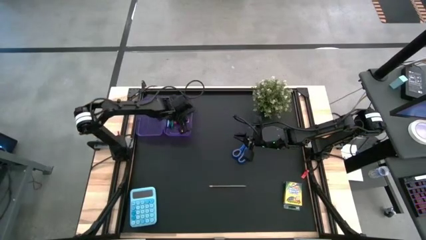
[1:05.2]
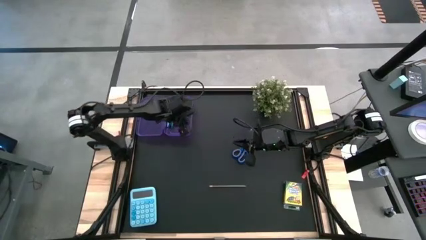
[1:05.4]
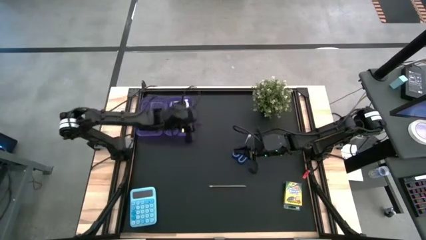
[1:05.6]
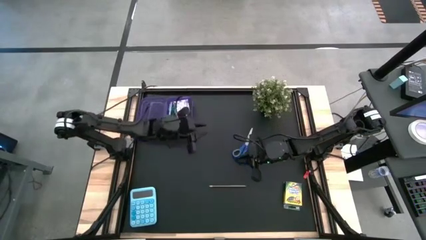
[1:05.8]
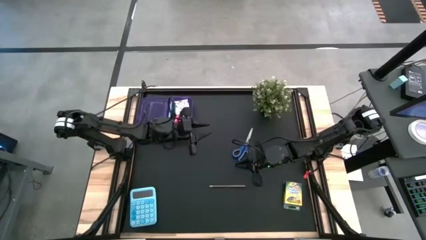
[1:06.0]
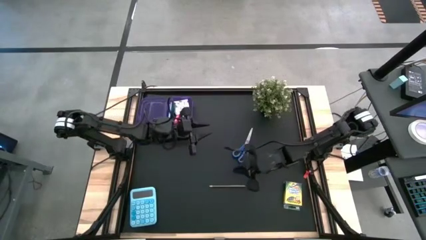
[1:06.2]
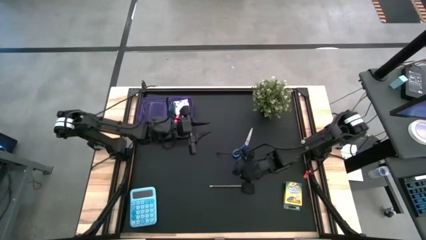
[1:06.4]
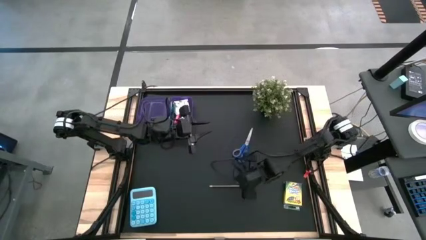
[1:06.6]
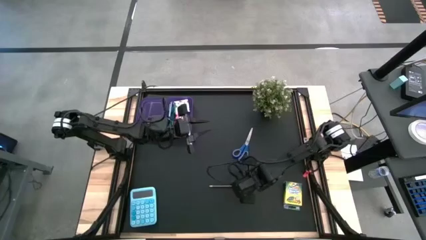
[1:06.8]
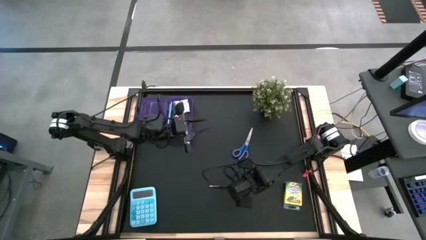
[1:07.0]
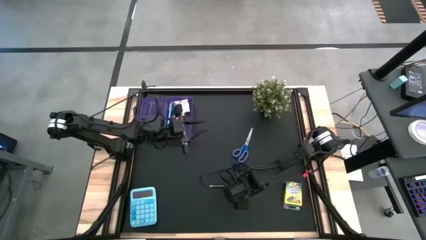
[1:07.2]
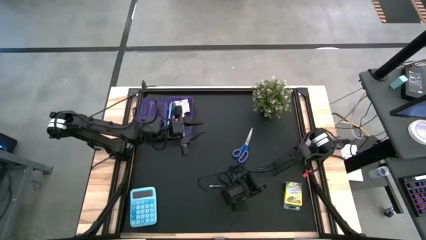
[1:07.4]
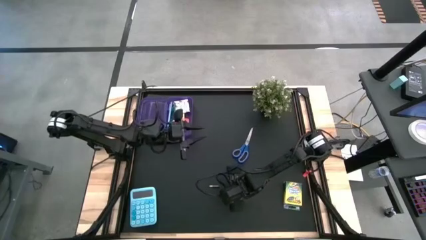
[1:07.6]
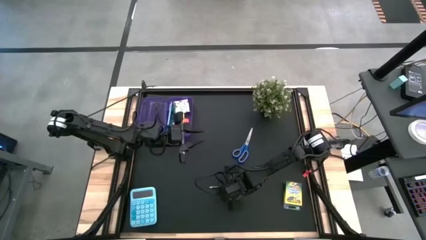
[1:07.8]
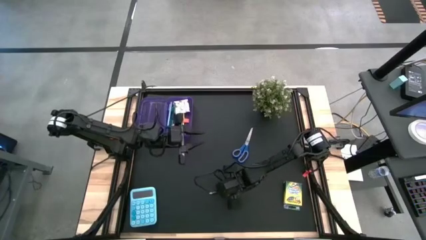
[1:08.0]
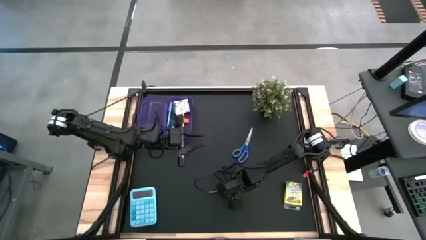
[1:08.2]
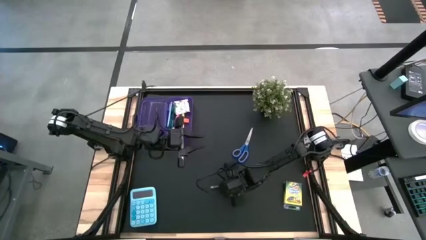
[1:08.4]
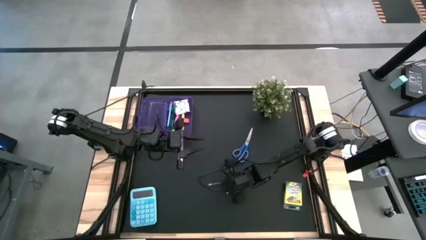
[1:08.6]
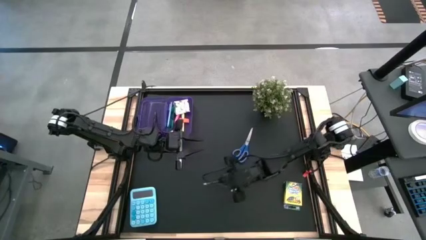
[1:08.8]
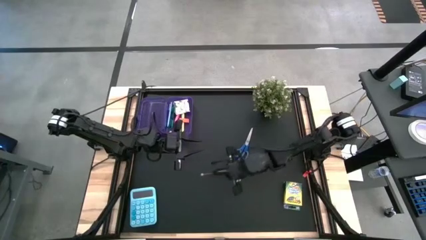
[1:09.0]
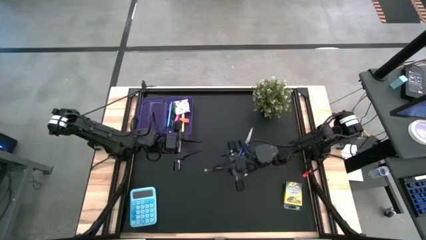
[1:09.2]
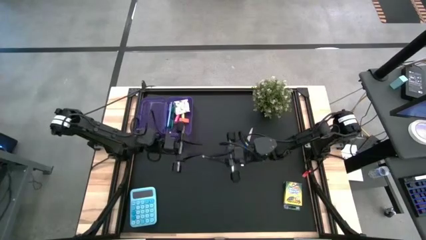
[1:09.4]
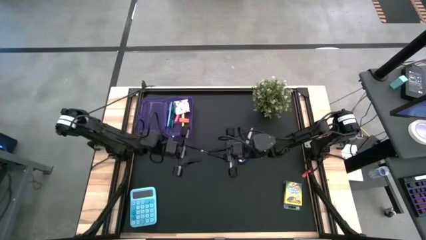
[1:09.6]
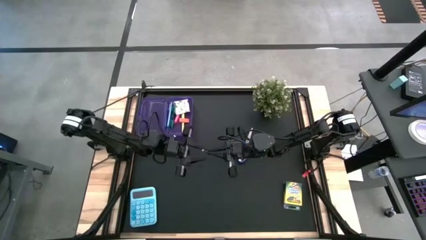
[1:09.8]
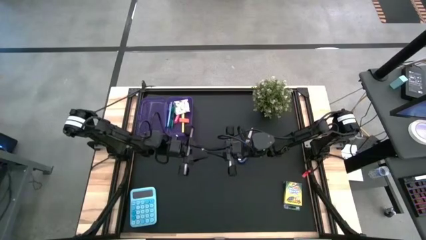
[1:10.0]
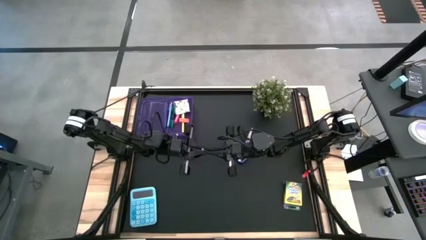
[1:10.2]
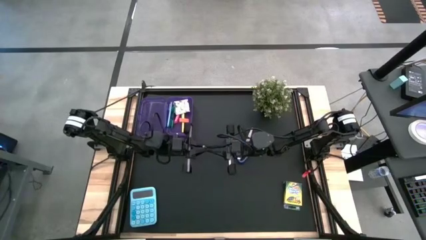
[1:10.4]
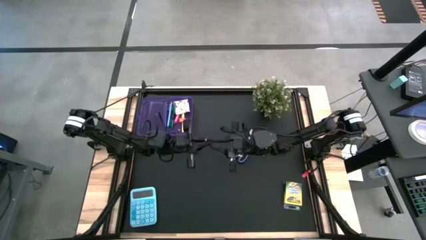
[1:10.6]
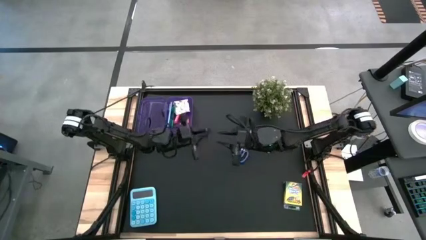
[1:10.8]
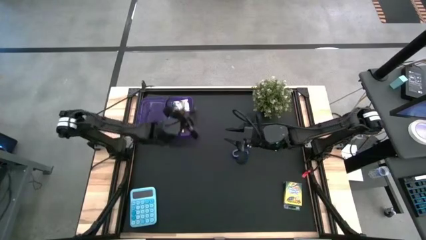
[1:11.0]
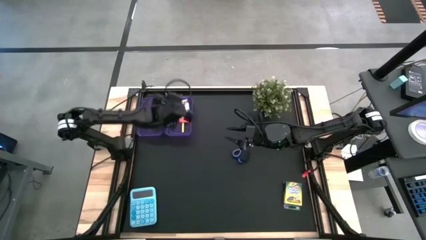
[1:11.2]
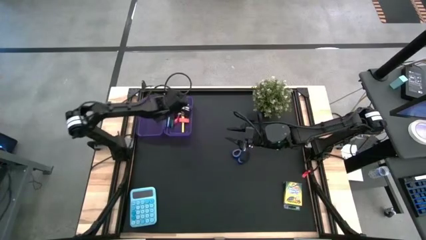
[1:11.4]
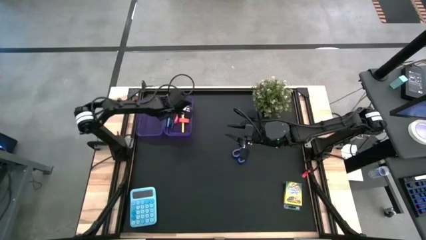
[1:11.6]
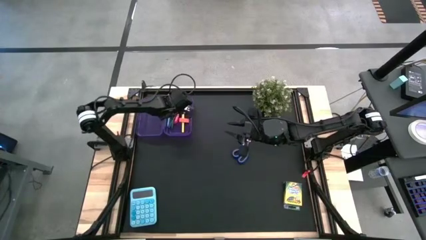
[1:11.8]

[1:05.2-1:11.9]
Task: Pack school essentials
Put the blue pencil into the purple box

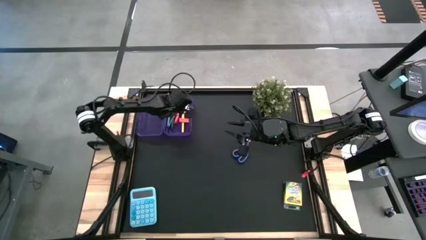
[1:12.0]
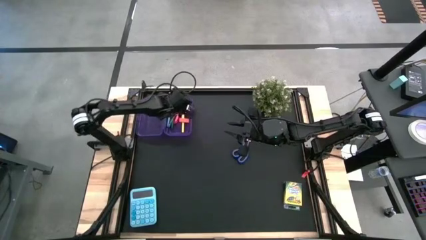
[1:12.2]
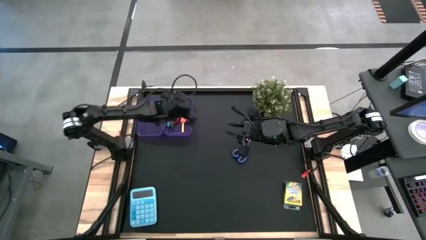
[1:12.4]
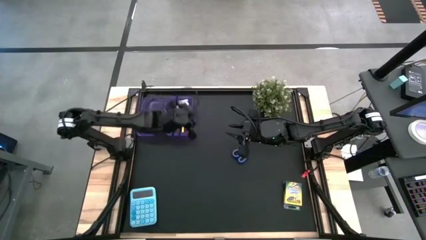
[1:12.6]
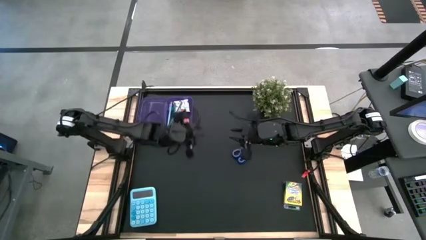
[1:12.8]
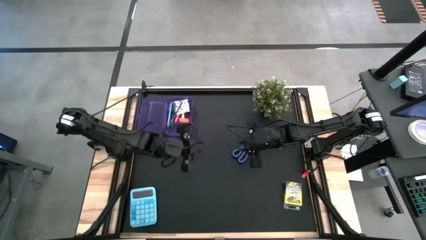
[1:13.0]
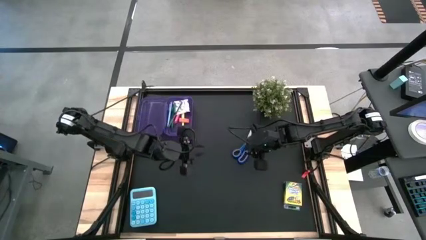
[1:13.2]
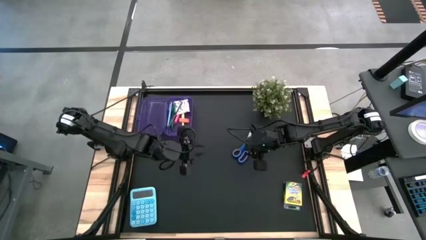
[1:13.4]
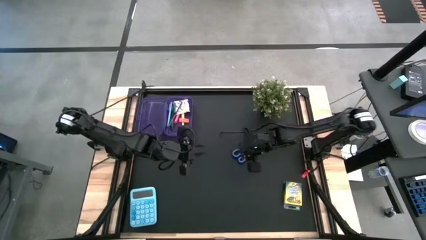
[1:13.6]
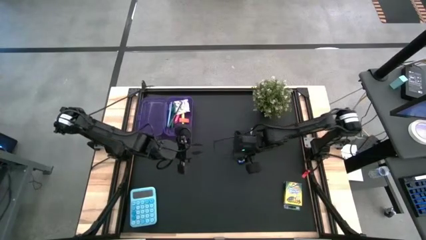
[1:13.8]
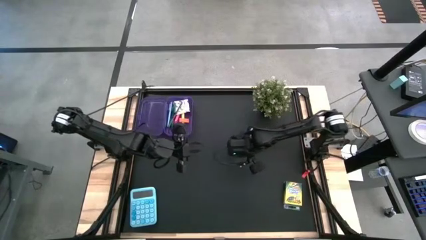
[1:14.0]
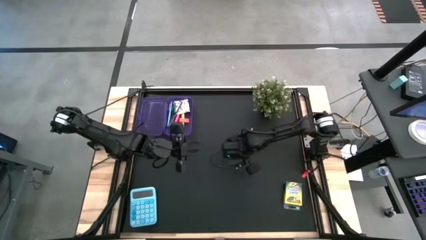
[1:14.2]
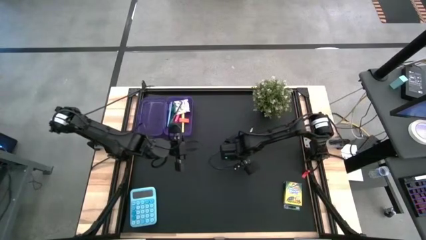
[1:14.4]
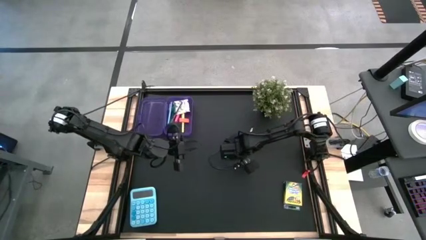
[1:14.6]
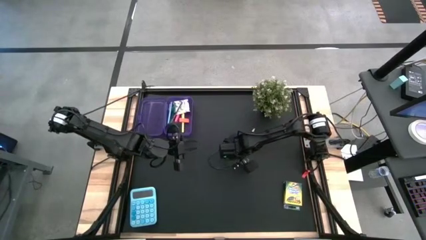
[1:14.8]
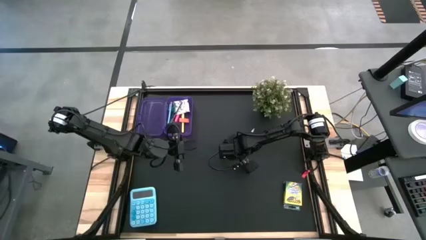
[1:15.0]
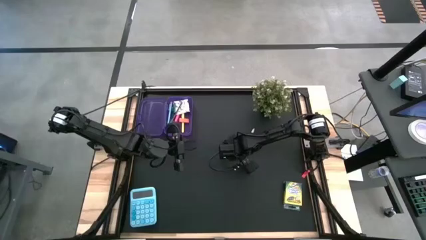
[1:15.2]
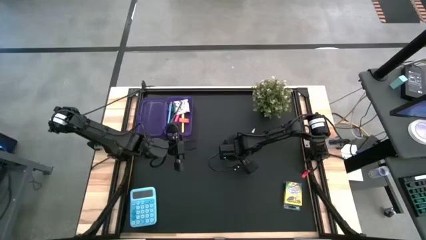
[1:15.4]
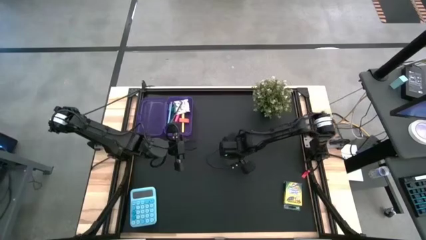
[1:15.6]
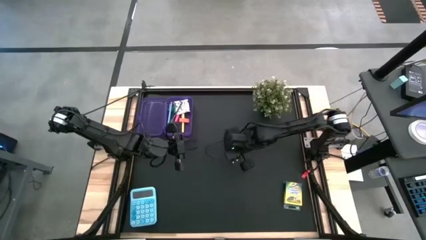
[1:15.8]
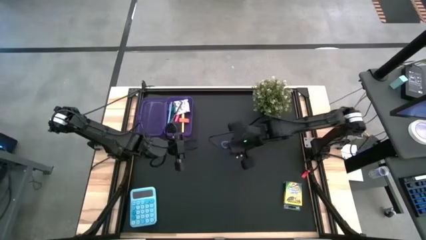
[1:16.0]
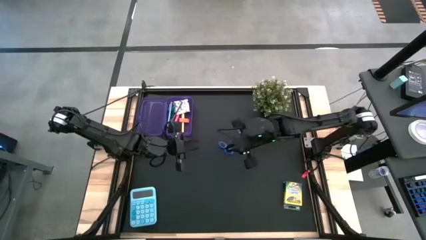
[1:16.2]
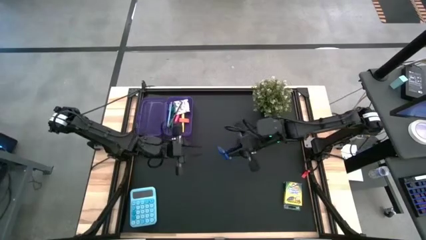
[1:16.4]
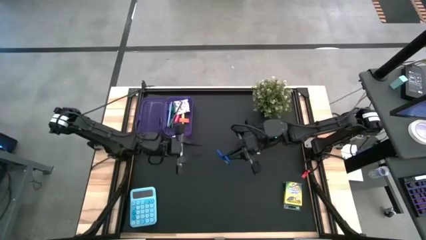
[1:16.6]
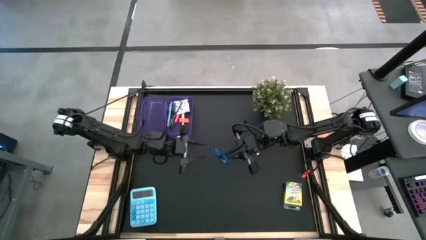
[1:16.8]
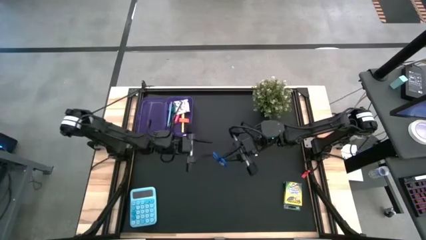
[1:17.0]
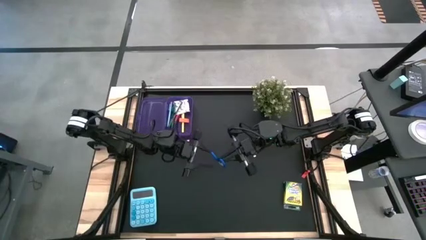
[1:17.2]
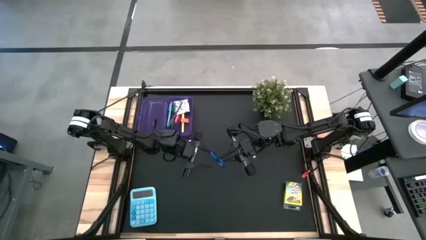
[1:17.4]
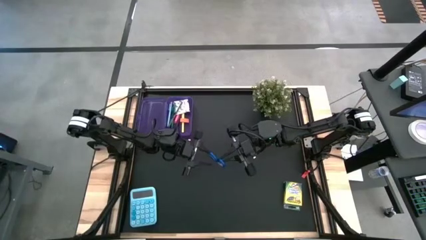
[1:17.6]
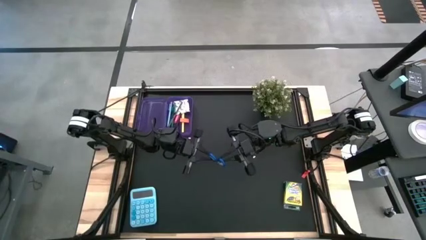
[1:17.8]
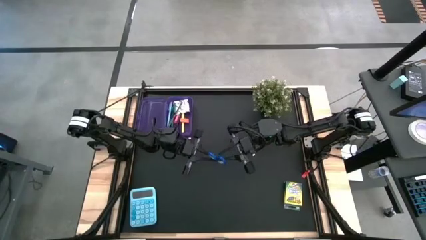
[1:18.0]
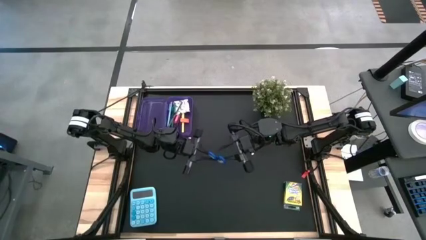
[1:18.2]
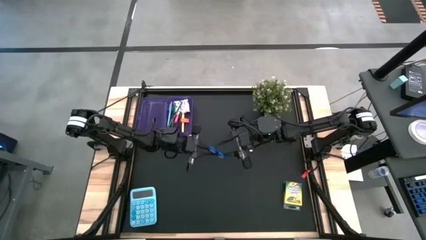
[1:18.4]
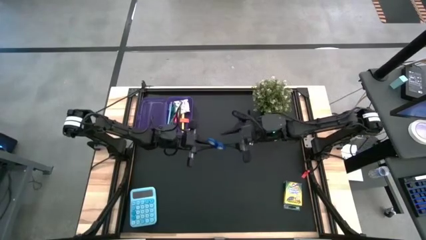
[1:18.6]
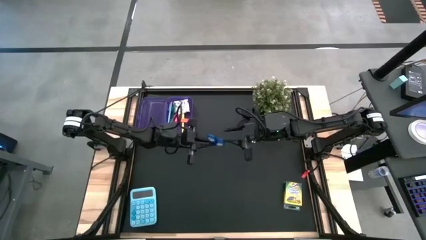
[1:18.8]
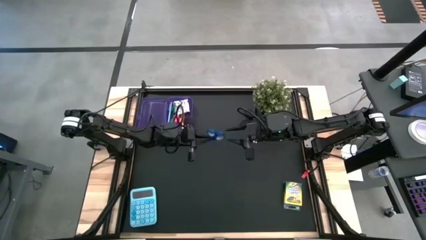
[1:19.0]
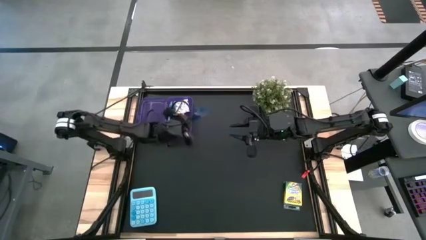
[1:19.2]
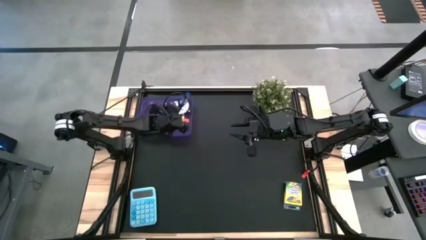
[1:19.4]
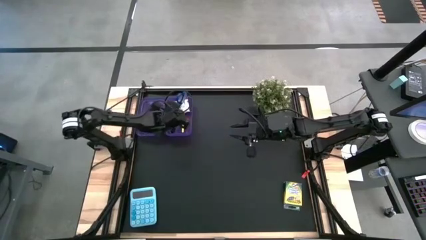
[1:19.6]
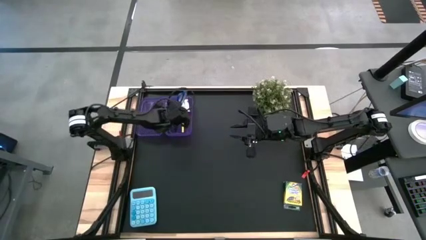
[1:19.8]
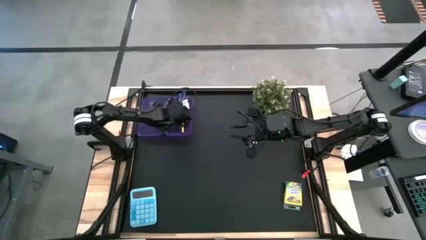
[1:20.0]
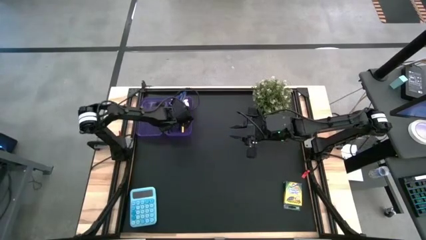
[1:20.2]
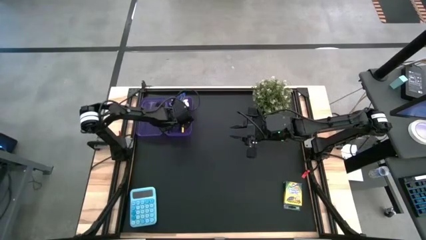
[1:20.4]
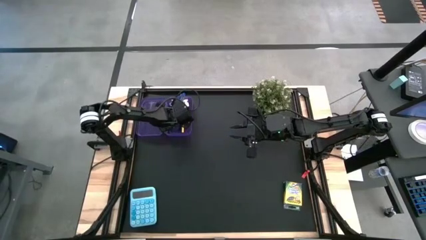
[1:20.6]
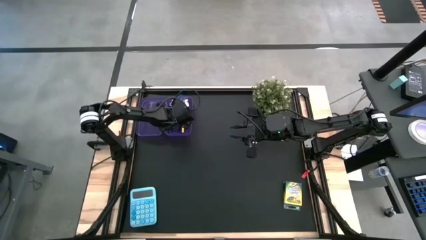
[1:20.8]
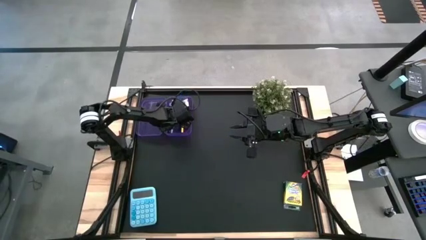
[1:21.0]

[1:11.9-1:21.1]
Put the blue scissors into the purple box
